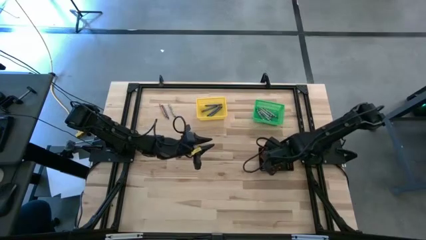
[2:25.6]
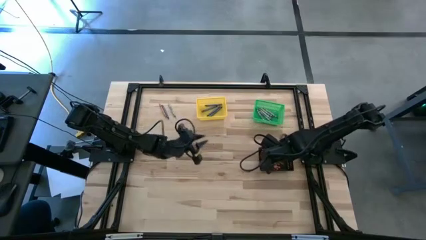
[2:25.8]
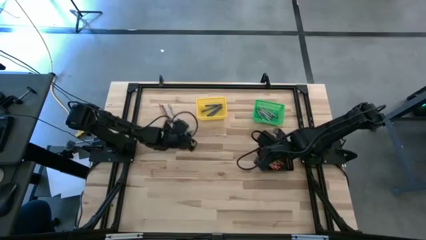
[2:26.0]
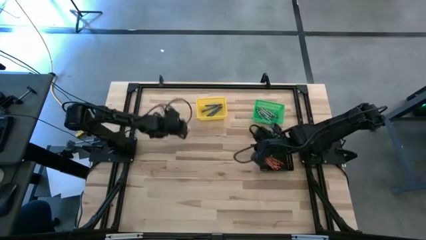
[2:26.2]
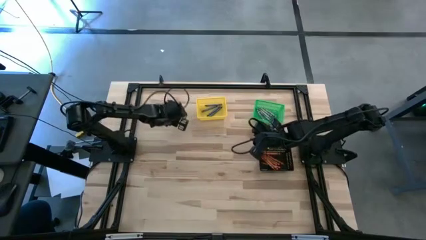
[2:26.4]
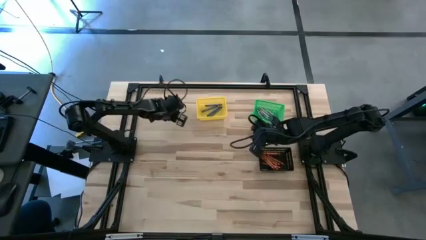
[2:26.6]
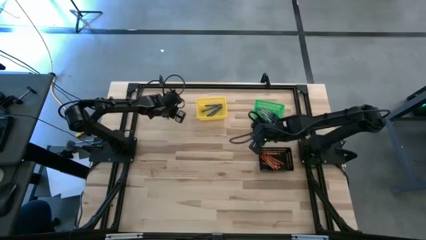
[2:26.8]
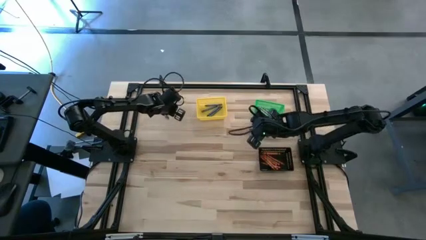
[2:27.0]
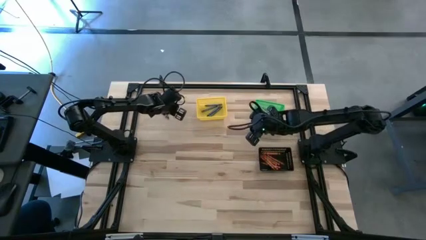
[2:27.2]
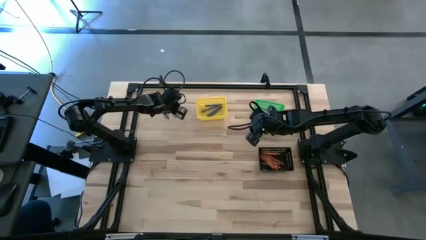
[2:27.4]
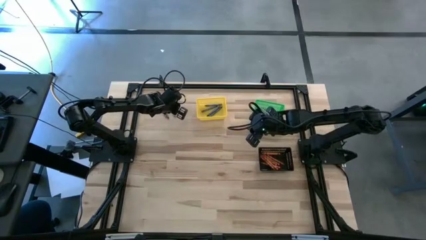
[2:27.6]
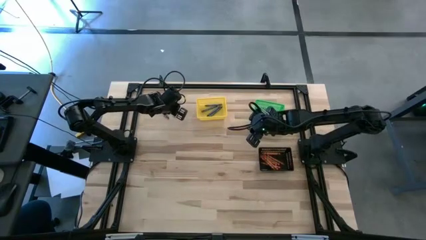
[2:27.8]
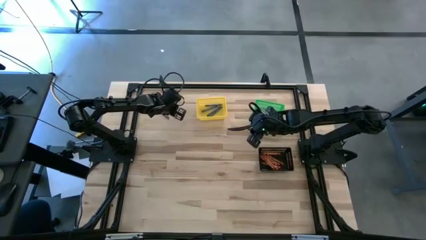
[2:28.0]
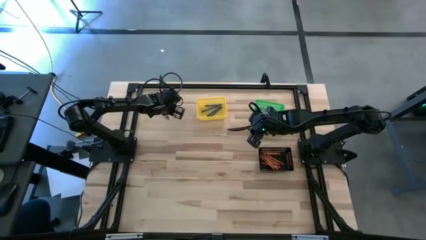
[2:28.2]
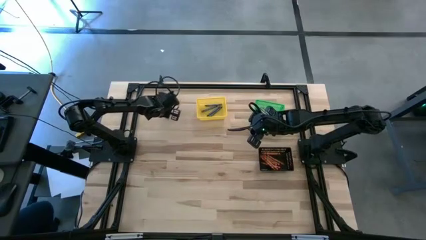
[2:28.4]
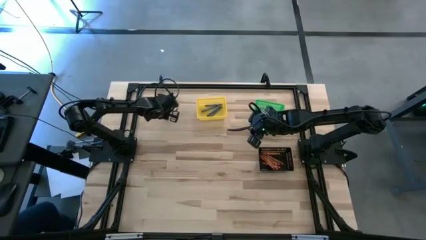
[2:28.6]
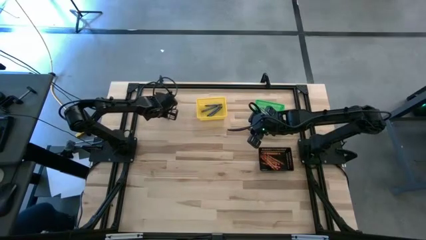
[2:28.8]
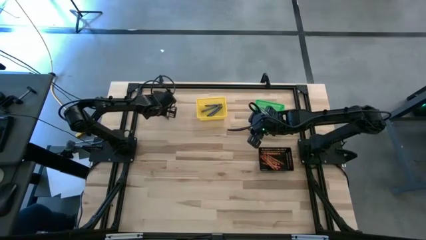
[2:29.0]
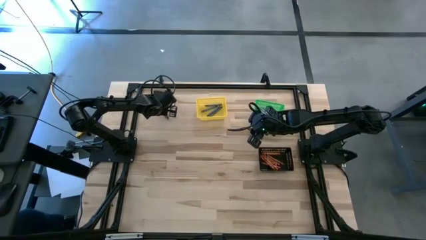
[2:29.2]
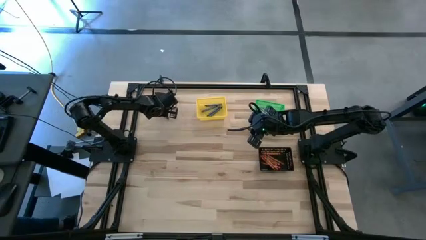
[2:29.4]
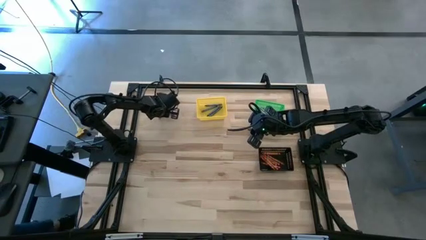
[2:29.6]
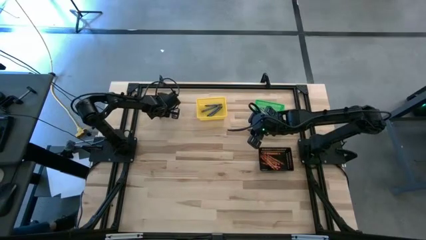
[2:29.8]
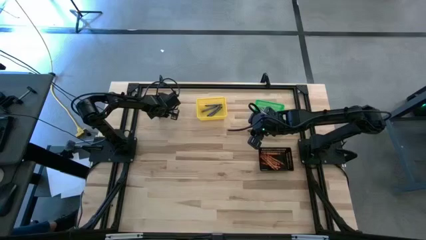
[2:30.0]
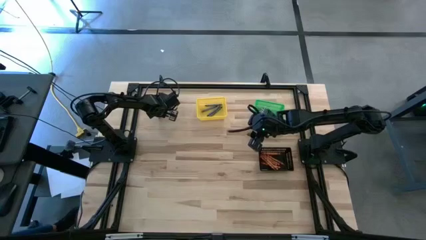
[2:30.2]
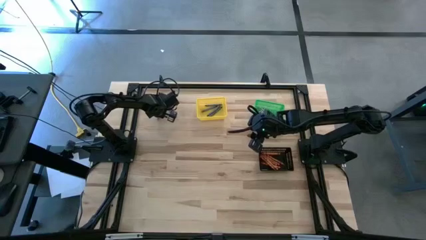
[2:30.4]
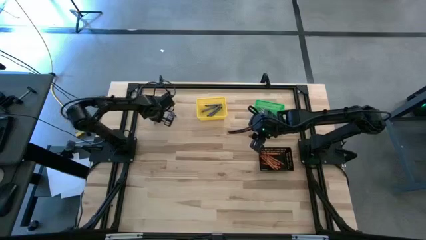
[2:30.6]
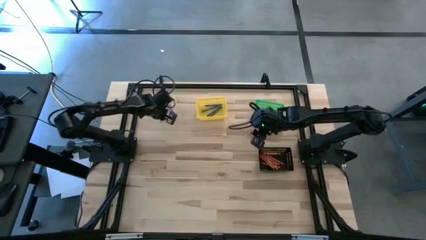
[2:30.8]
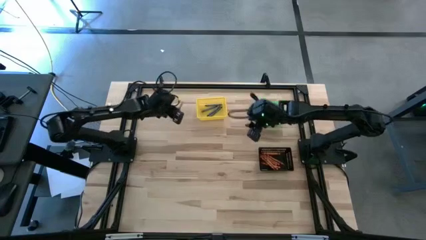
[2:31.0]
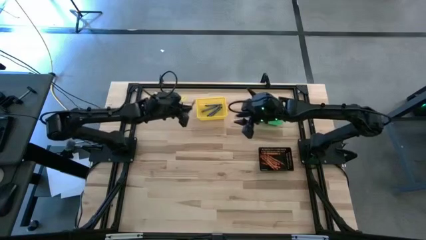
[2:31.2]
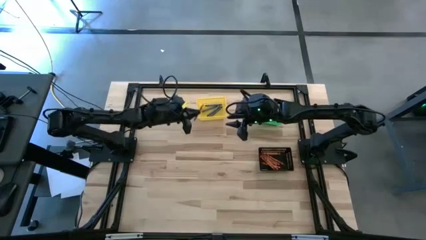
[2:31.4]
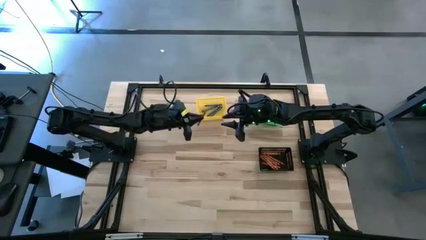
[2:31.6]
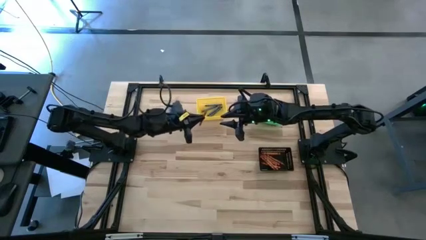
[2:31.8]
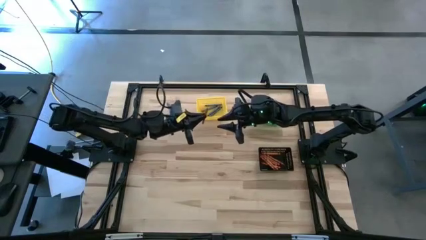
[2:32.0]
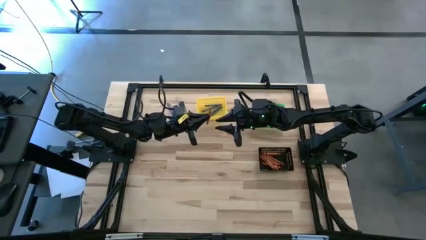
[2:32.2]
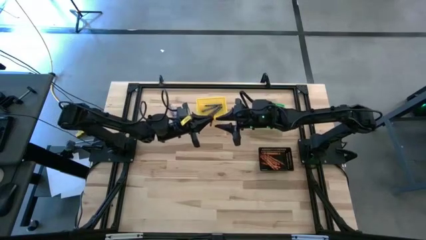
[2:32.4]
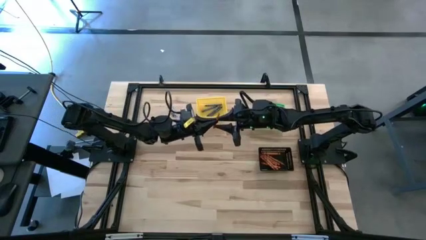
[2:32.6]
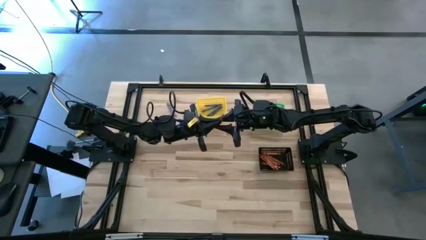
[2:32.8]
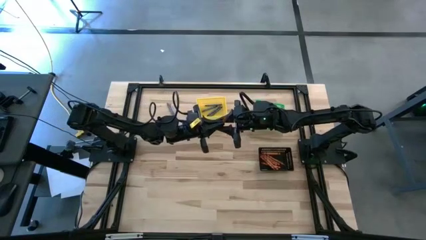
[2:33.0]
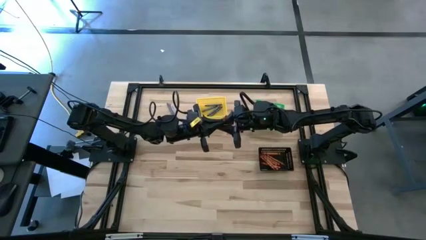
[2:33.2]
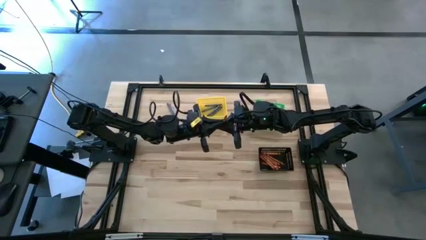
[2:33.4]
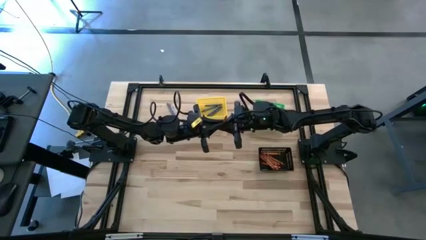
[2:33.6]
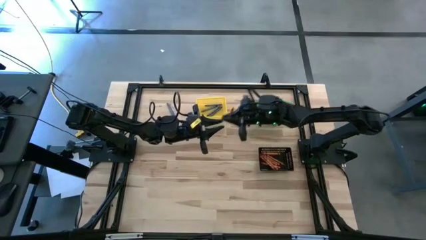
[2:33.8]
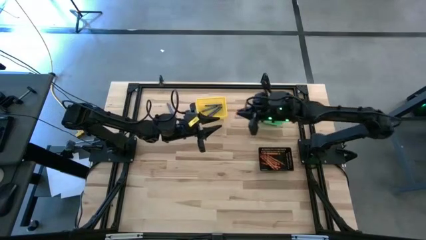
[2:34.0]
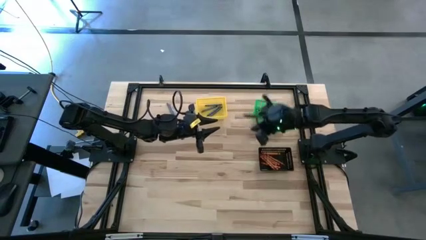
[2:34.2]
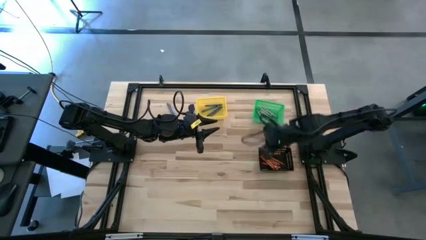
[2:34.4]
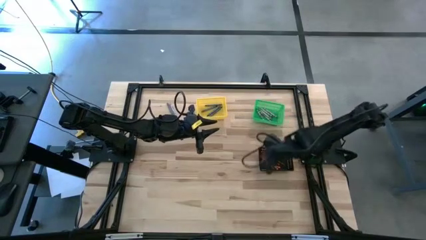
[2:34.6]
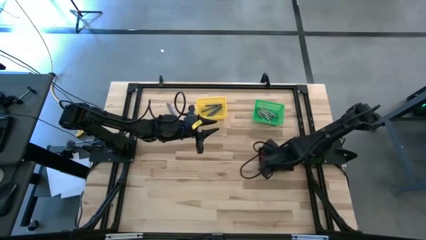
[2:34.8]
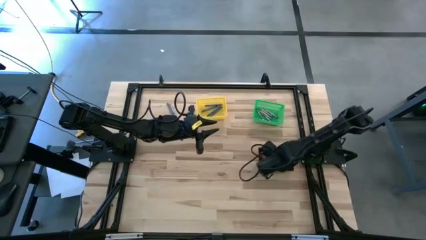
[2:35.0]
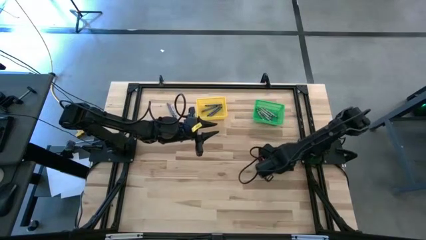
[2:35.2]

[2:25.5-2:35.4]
Task: Sort crayons
Put the orange crayon into the black basket

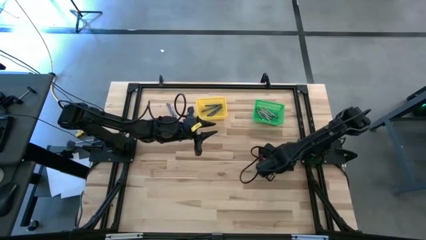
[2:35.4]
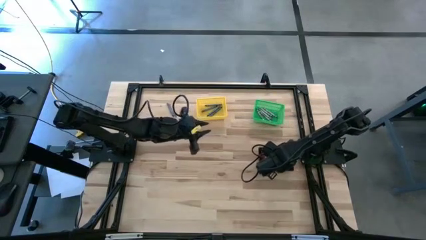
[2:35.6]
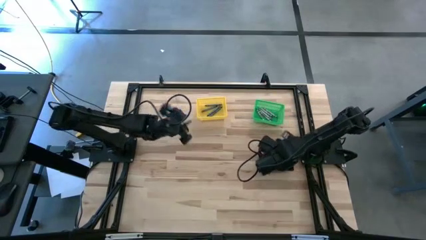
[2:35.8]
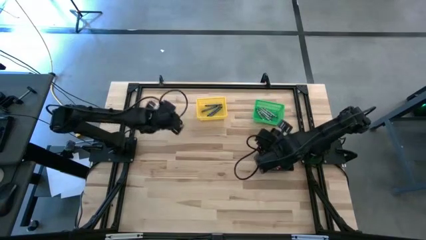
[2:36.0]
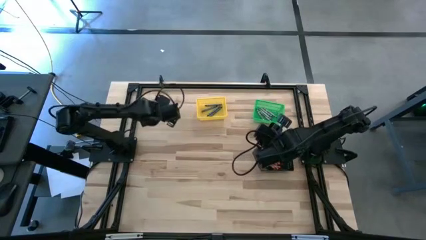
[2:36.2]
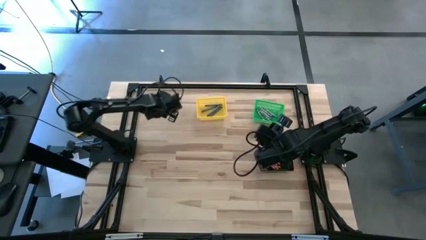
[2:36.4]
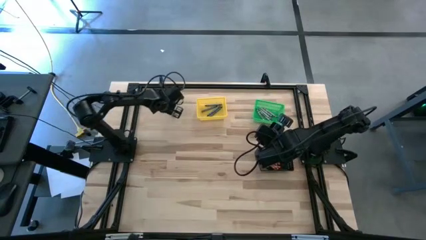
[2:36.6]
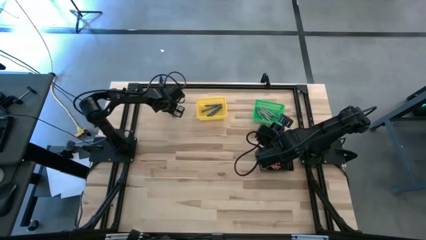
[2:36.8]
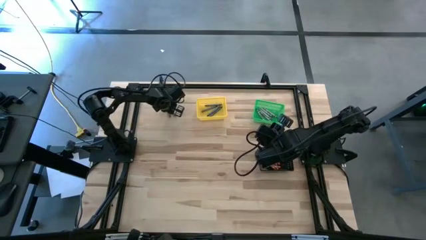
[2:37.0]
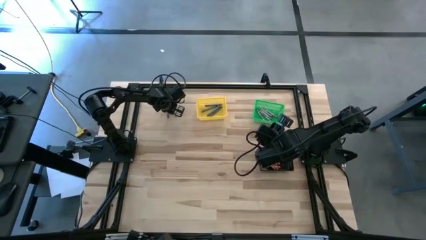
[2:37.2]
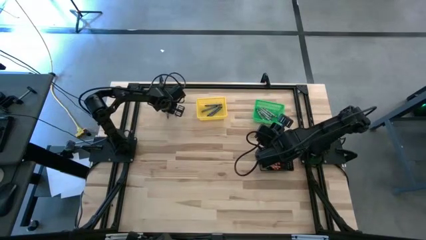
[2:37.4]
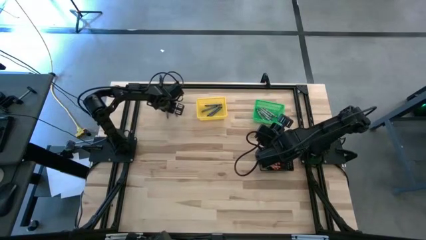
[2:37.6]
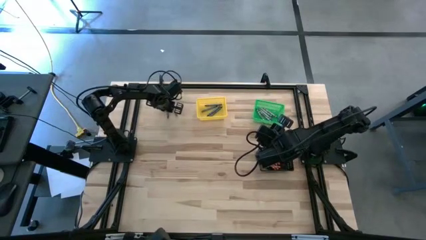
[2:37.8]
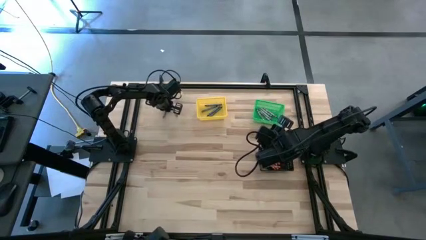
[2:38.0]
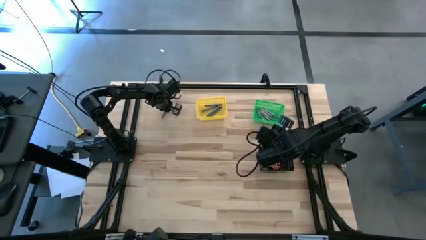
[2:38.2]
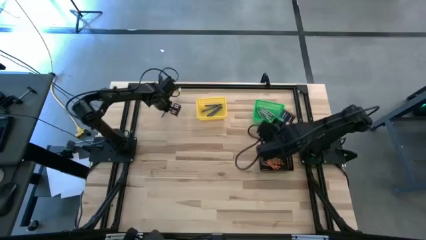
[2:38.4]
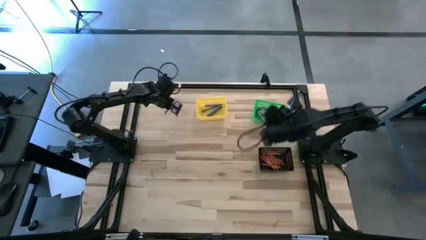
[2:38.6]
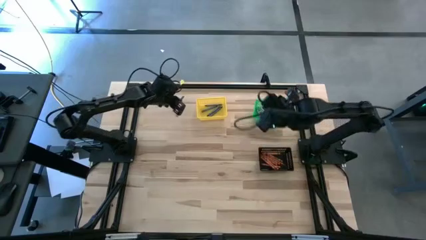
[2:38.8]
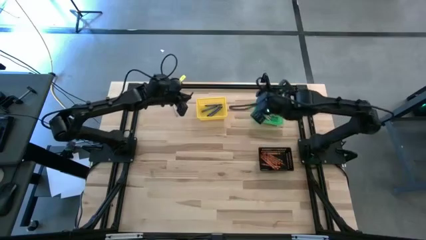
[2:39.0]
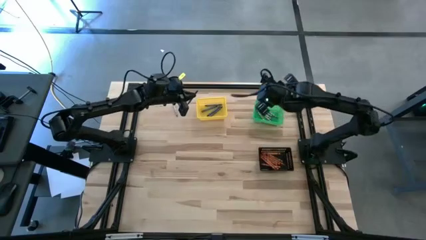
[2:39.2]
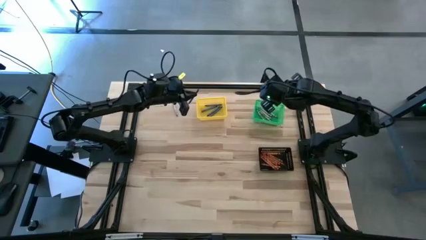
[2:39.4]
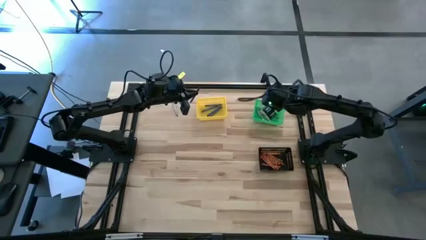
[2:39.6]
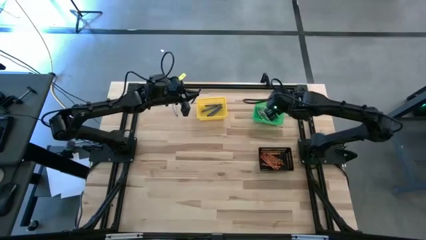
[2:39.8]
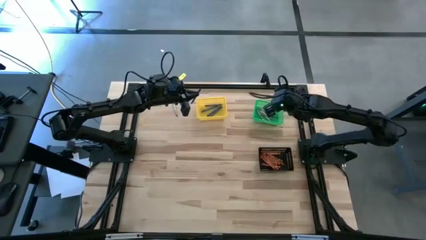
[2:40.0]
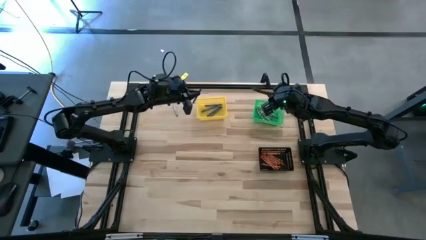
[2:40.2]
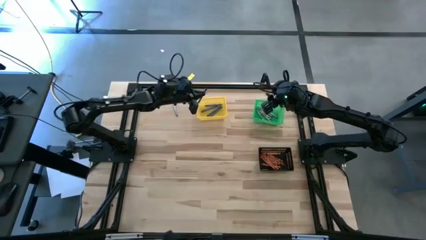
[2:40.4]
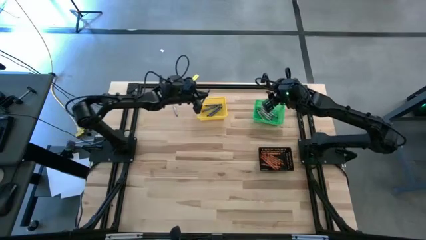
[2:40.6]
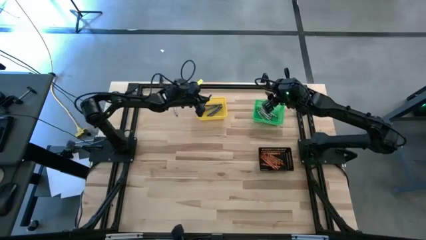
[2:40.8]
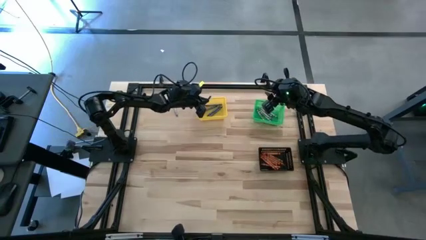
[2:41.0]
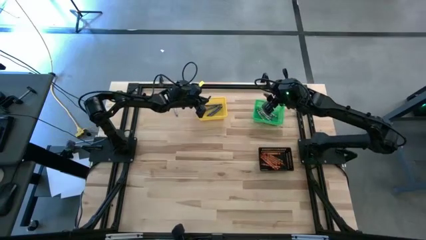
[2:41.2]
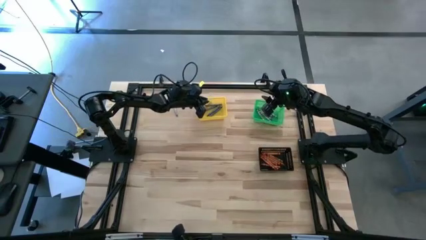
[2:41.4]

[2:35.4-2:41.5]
Put the blue crayon into the yellow basket
